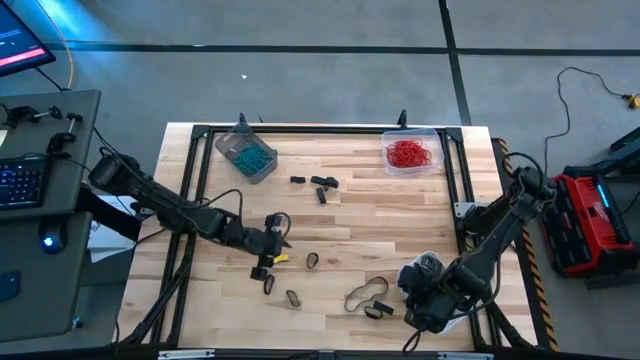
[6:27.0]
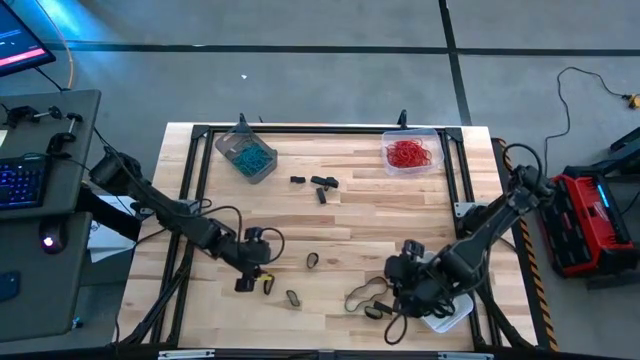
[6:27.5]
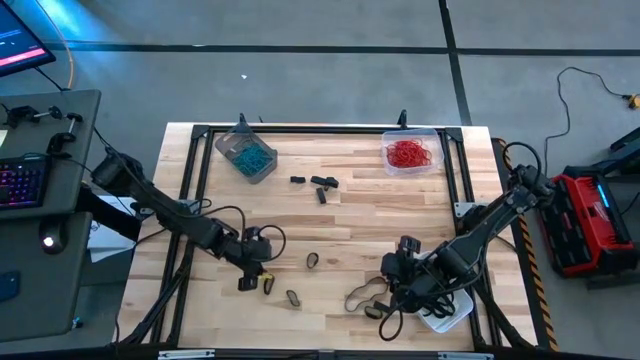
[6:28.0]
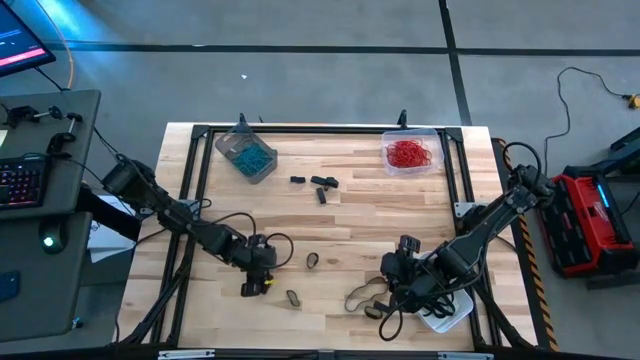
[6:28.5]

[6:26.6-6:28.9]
Task: Sort rubber bands into baskets
Put the black rubber band into the white bin

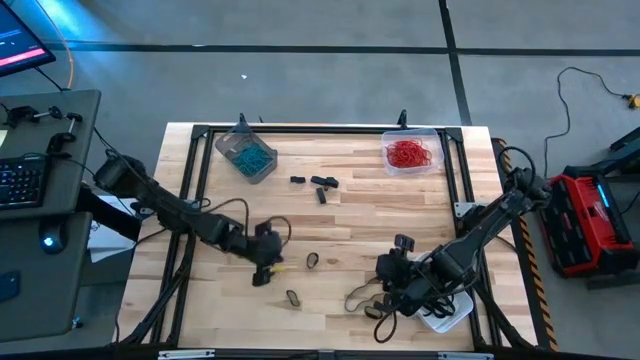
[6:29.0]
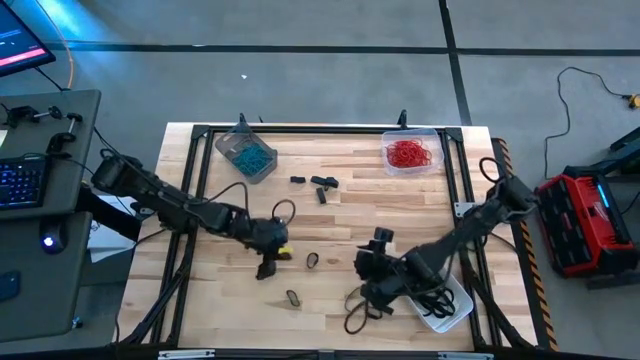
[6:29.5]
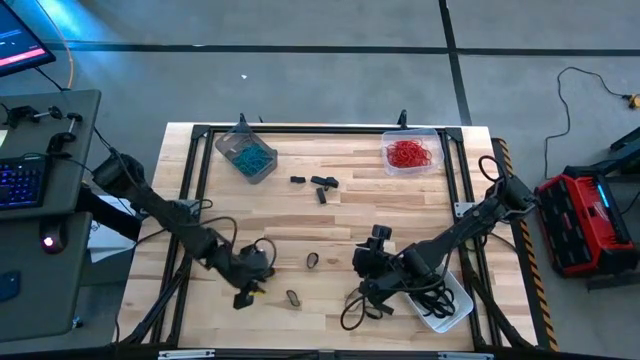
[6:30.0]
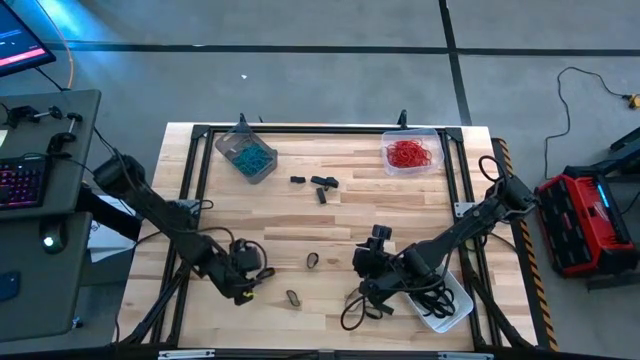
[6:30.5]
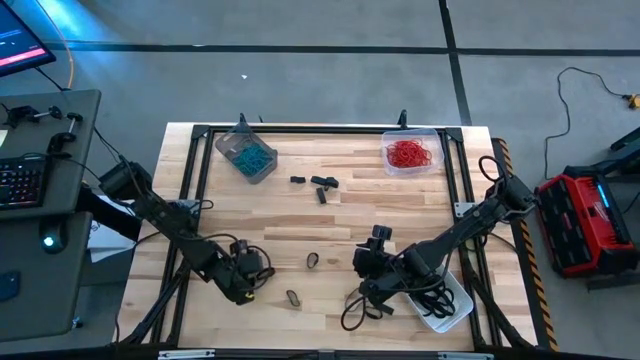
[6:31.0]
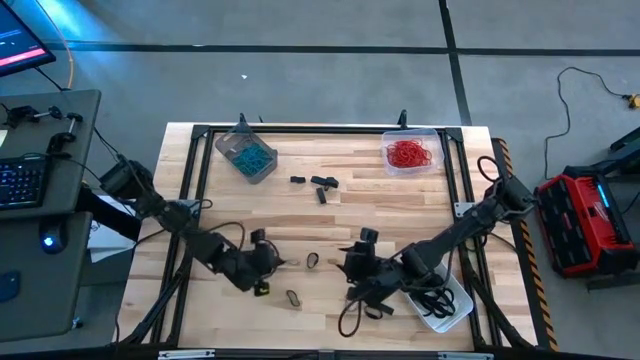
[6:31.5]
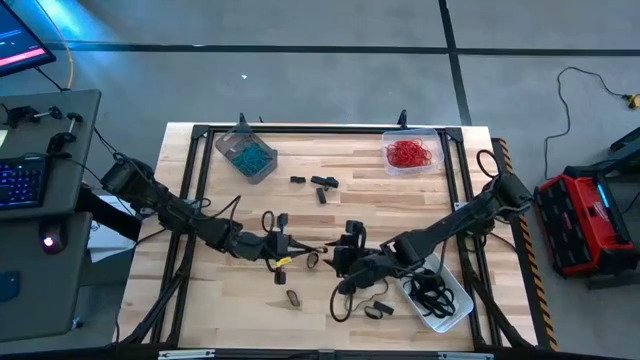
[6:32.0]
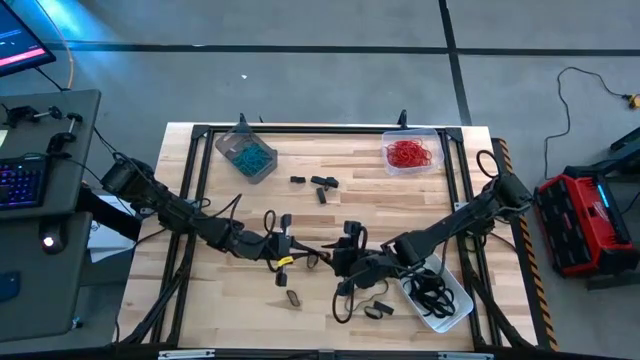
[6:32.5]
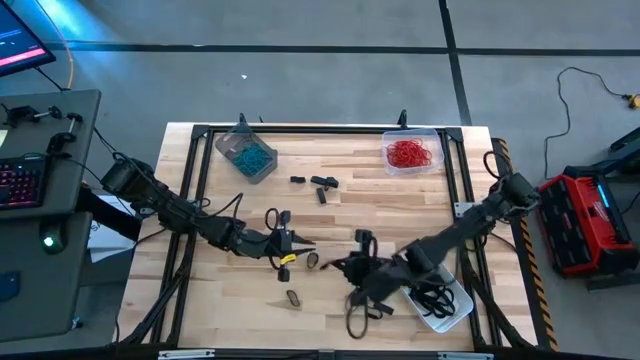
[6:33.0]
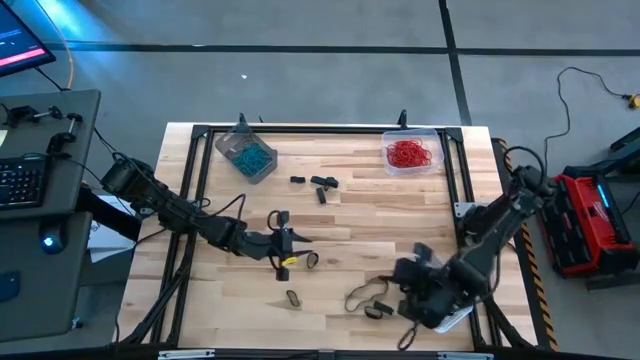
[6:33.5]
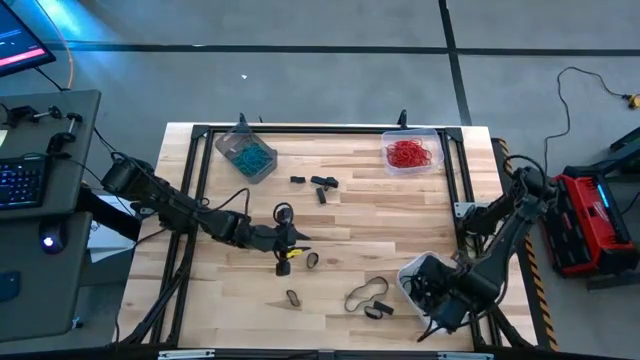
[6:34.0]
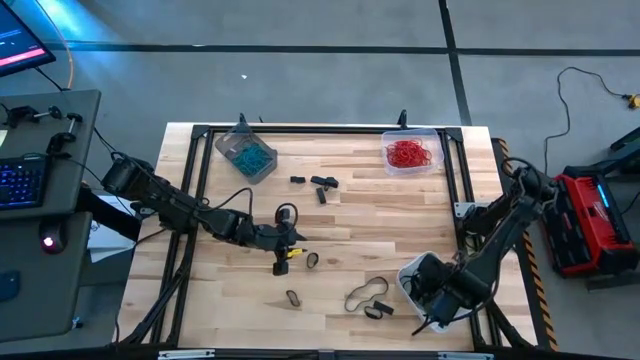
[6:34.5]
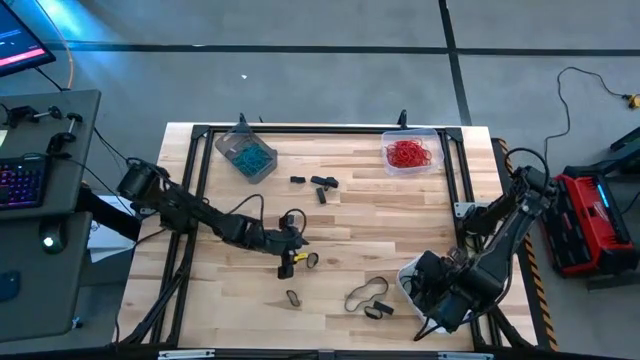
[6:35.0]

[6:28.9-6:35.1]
Put the black rubber band into the white bin

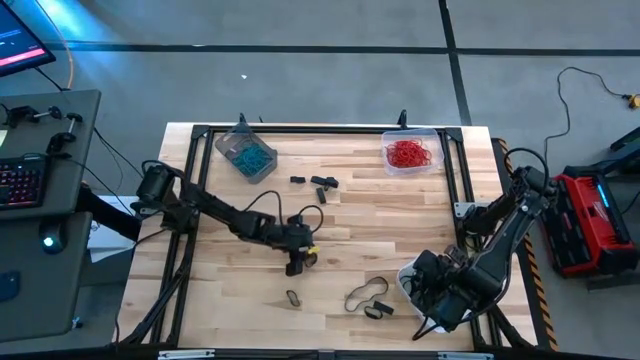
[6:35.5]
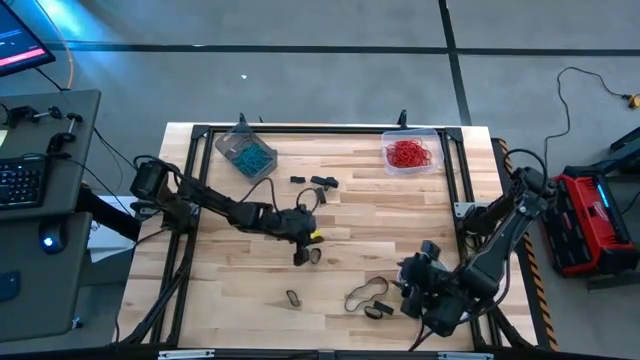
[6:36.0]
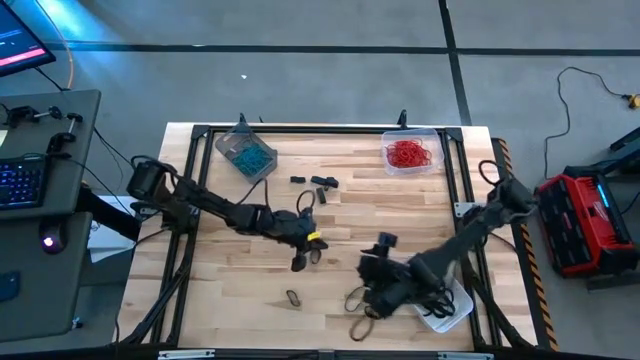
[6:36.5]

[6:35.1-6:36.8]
Put the black rubber band into the white bin

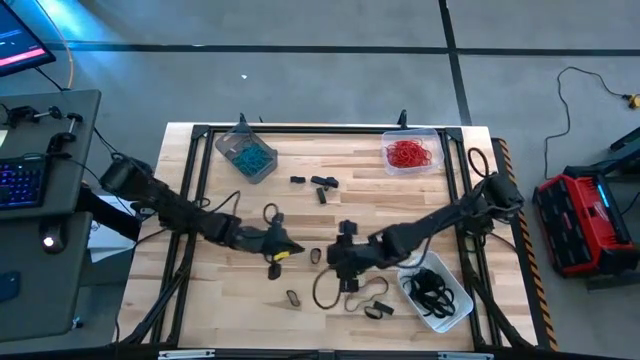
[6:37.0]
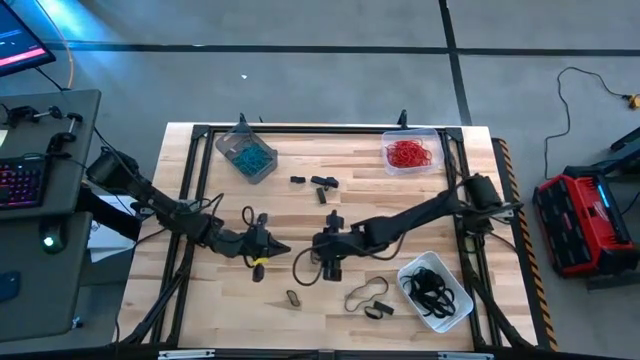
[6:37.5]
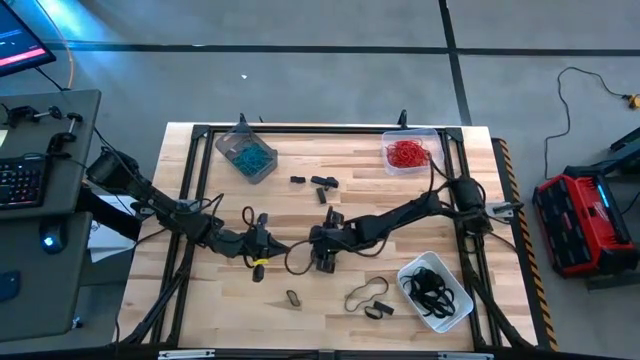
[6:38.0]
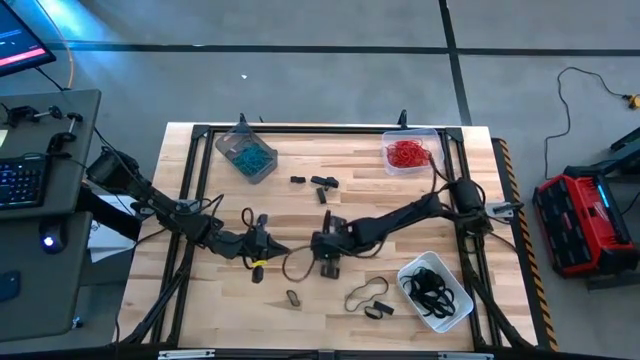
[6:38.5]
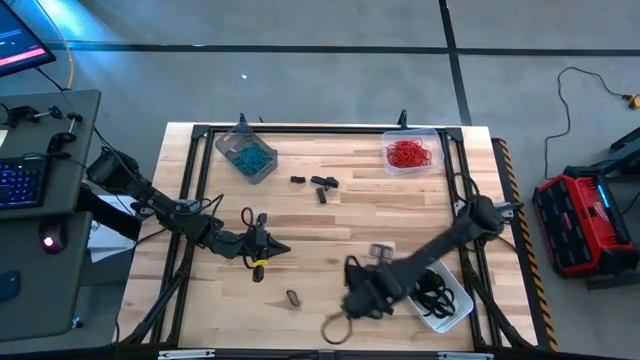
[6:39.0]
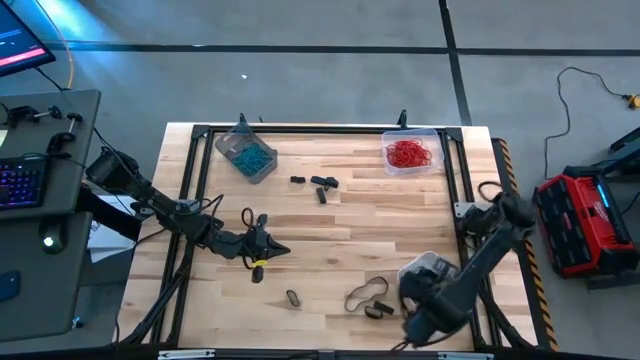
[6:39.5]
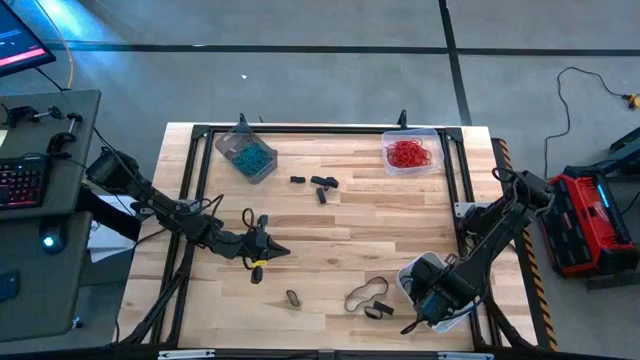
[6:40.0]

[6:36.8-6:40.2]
Put the black rubber band into the white bin

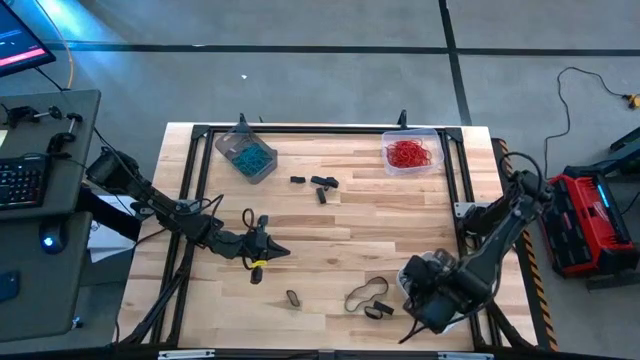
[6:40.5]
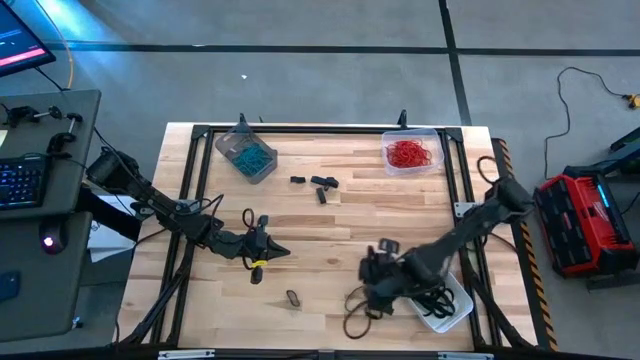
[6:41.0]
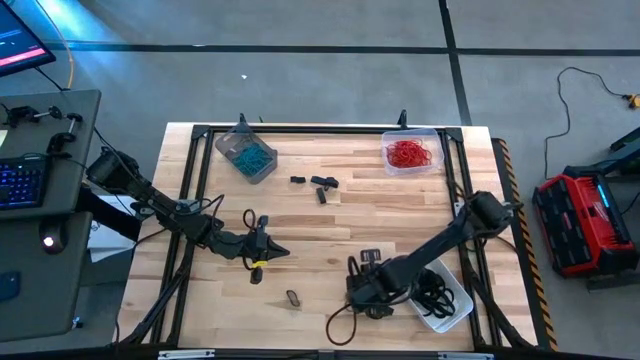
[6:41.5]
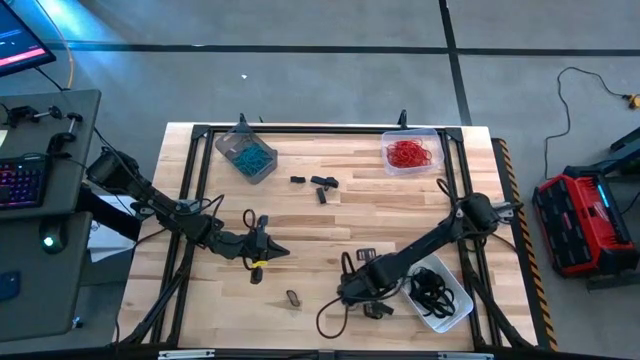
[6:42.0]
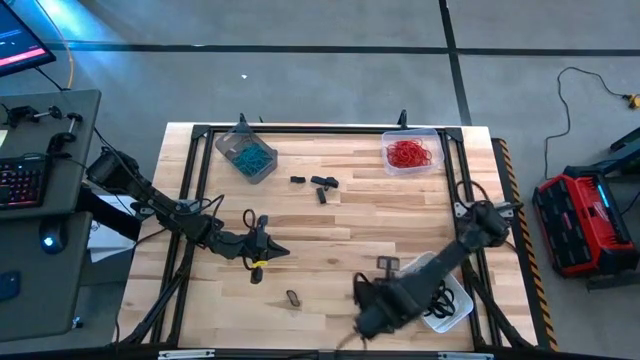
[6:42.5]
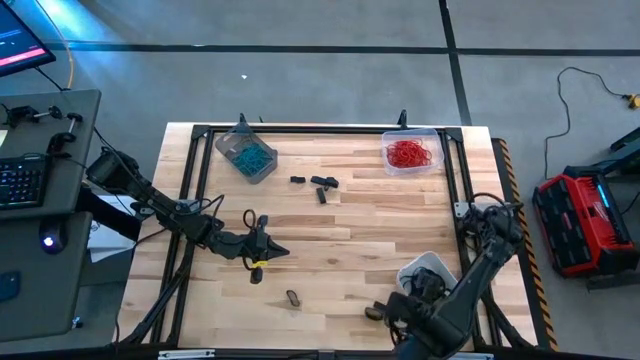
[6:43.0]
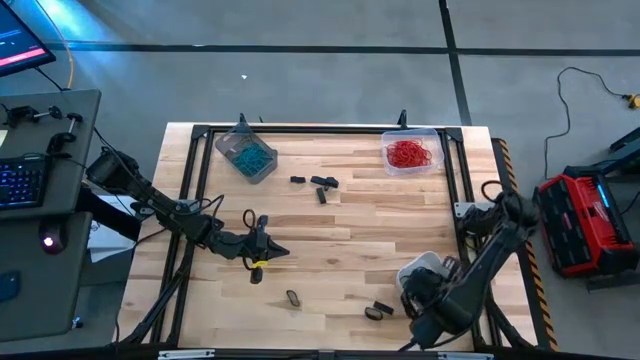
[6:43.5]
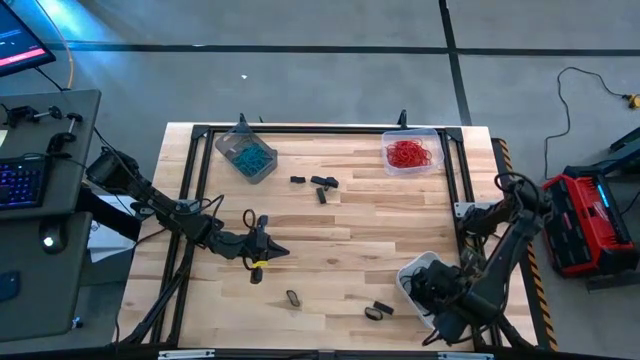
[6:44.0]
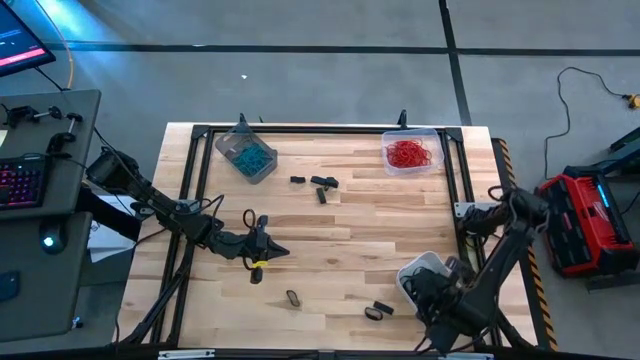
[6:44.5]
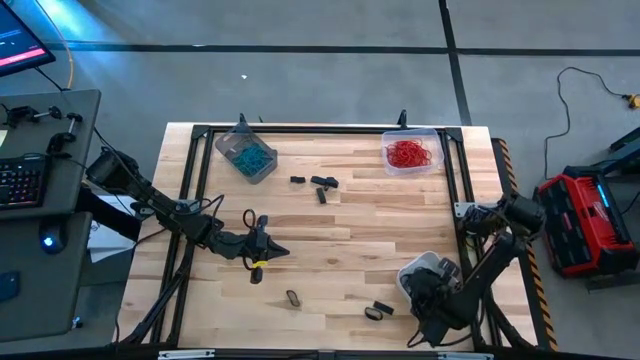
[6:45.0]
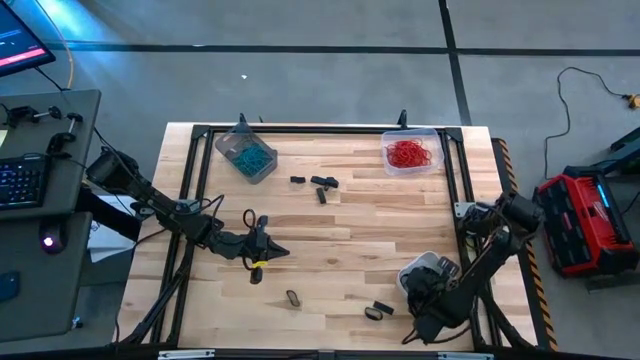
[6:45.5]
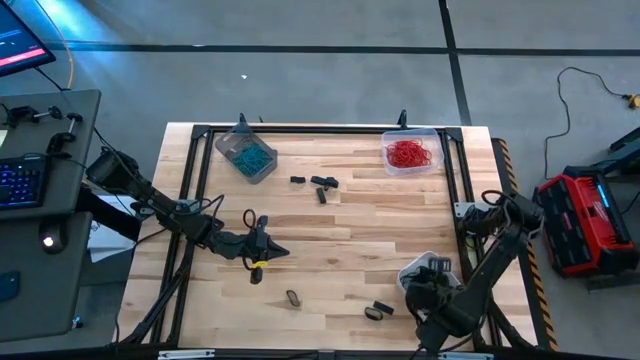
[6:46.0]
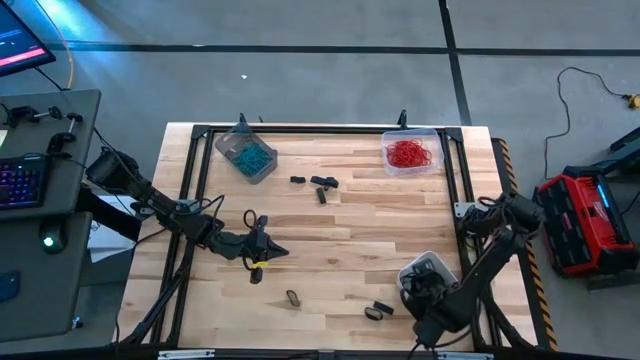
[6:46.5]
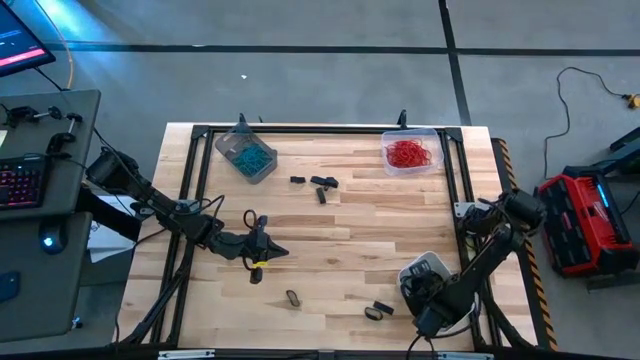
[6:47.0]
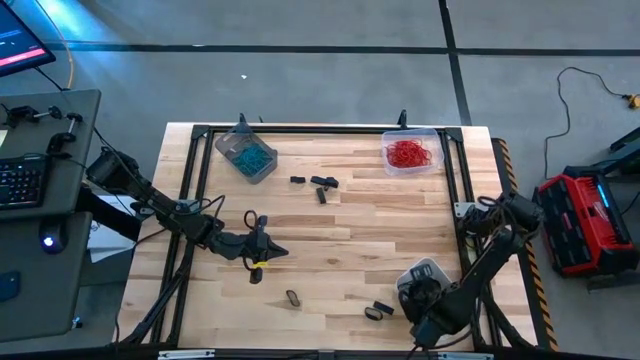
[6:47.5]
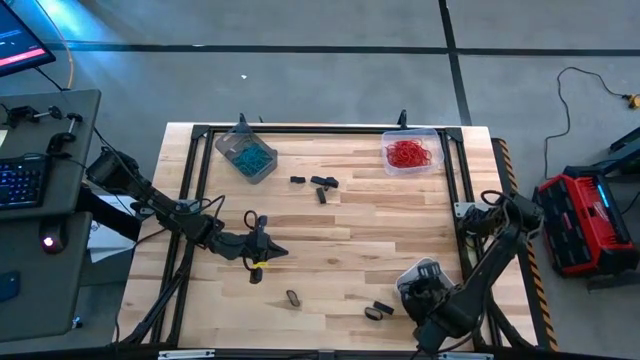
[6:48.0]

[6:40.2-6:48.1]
Put the black rubber band into the white bin
